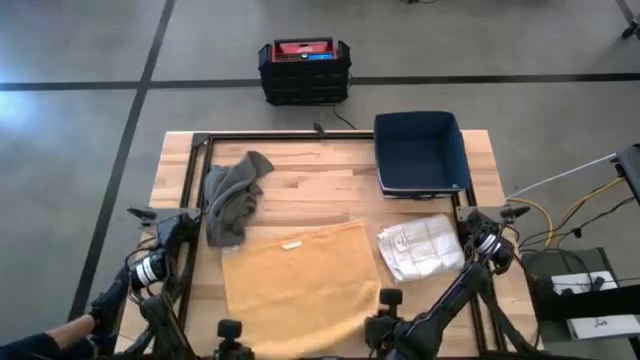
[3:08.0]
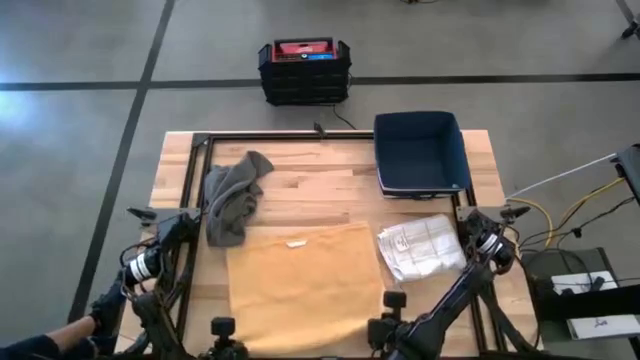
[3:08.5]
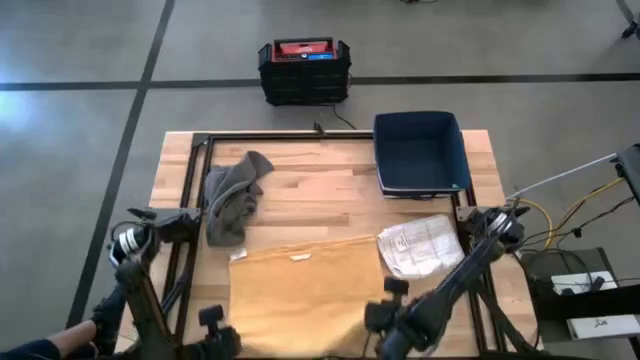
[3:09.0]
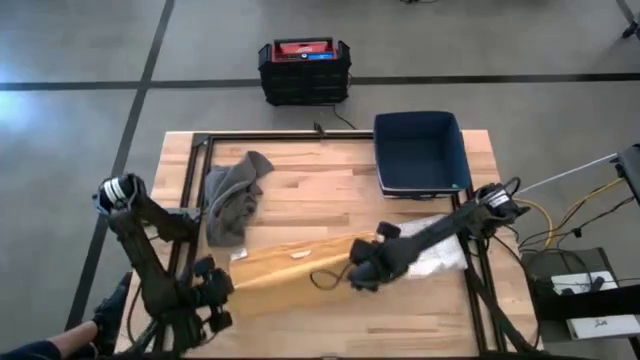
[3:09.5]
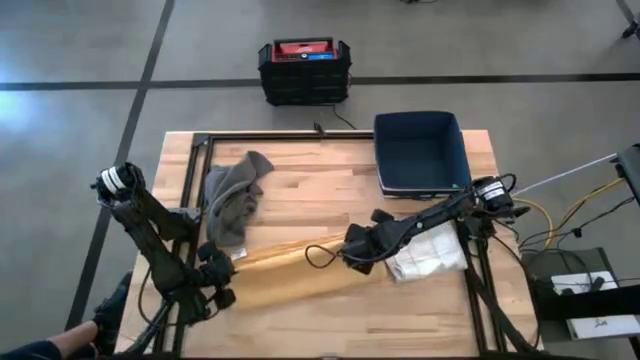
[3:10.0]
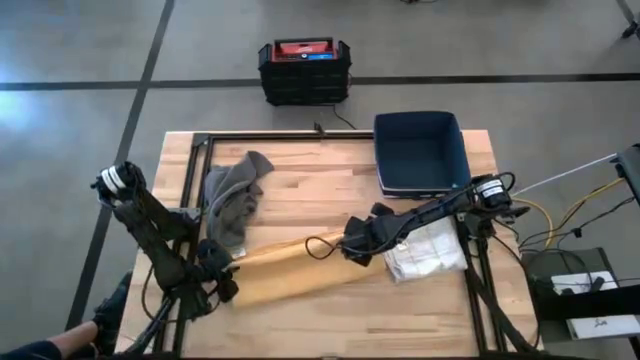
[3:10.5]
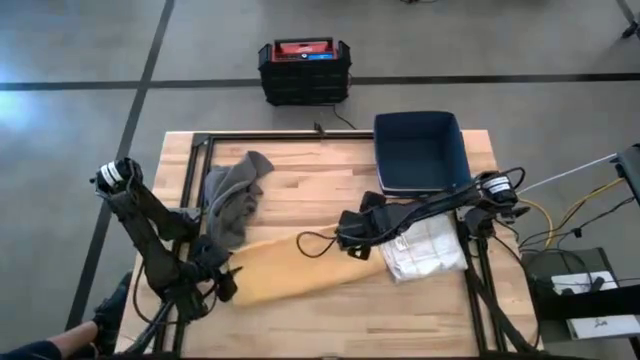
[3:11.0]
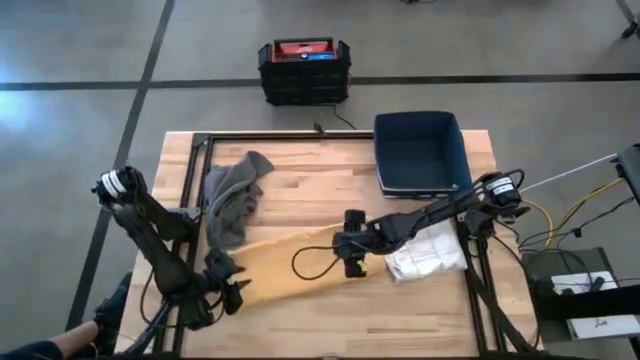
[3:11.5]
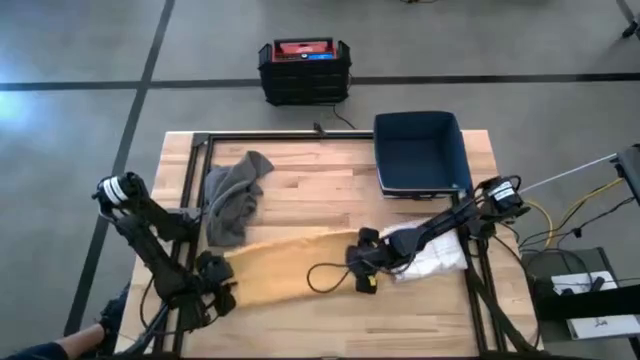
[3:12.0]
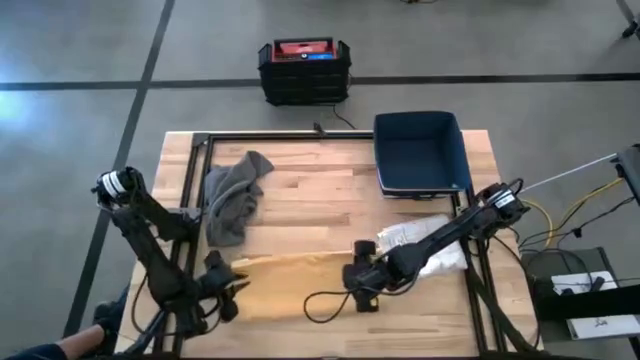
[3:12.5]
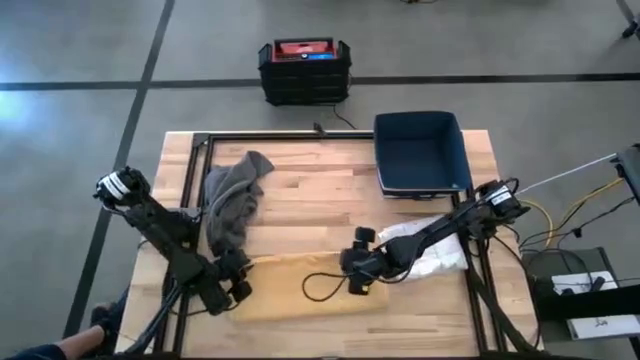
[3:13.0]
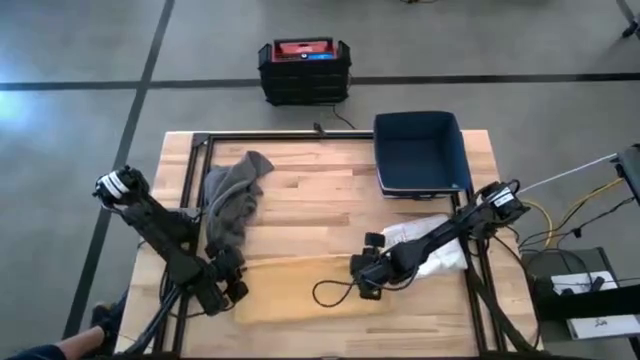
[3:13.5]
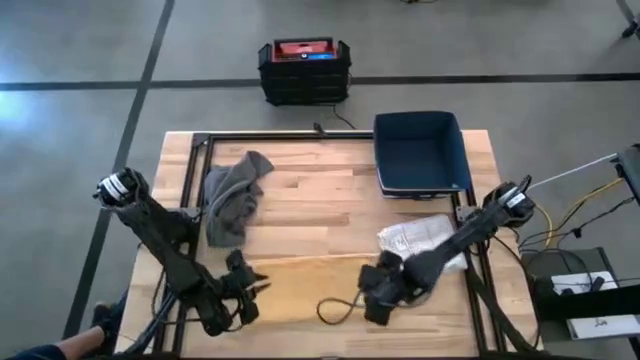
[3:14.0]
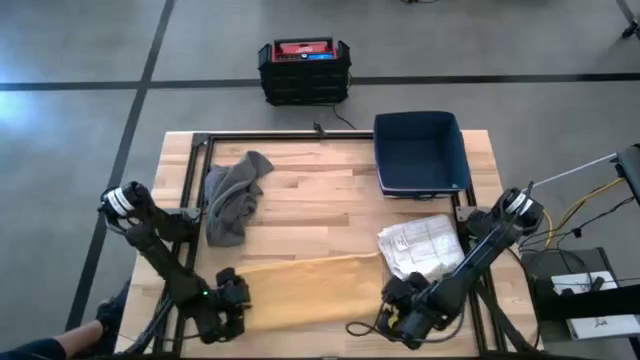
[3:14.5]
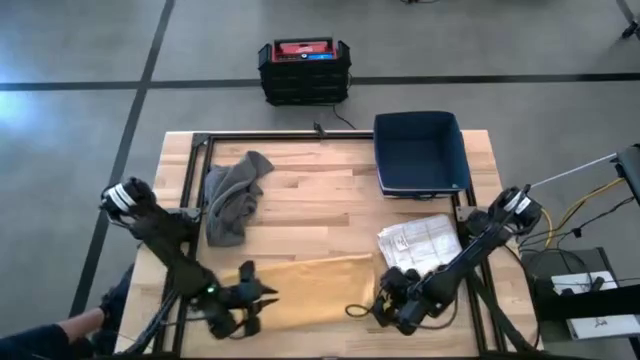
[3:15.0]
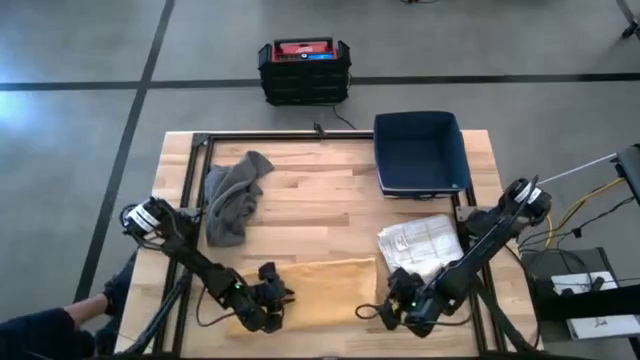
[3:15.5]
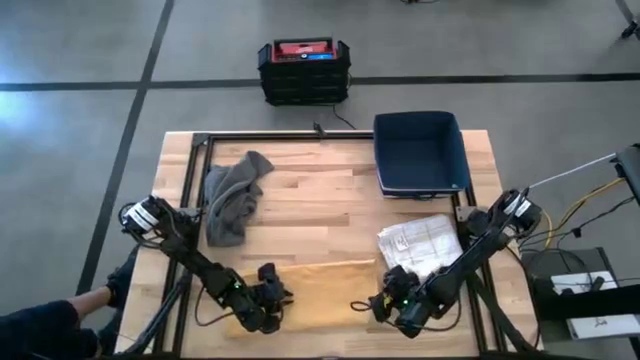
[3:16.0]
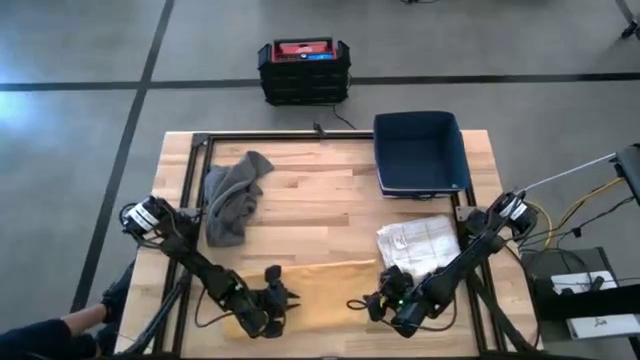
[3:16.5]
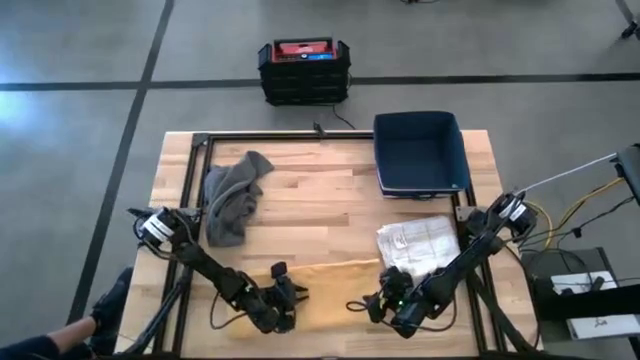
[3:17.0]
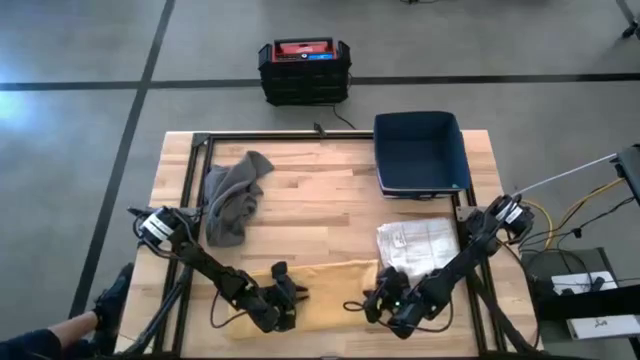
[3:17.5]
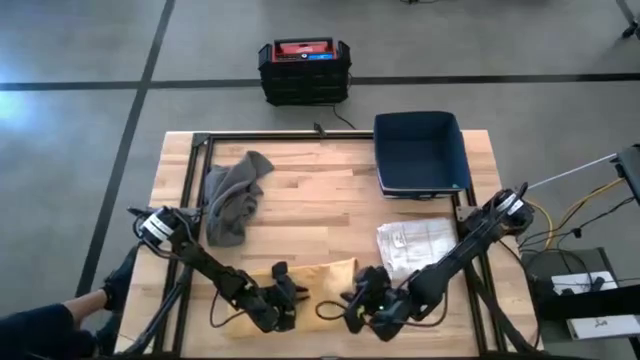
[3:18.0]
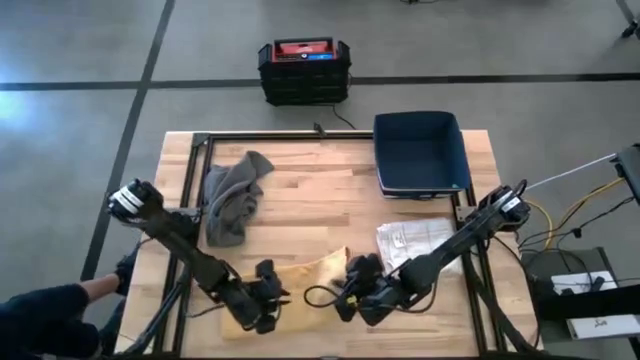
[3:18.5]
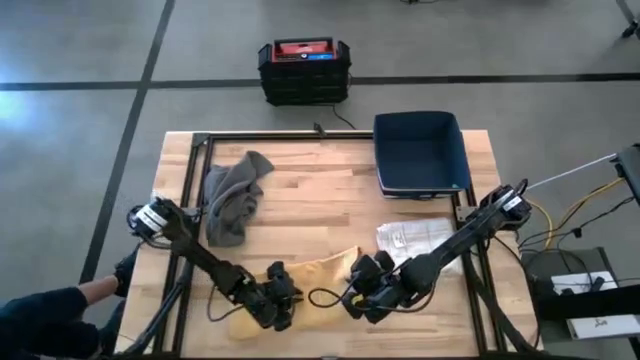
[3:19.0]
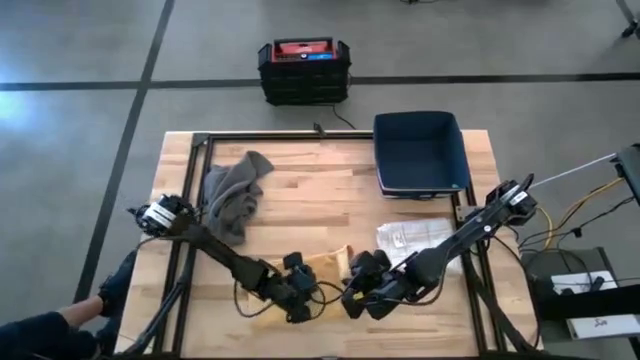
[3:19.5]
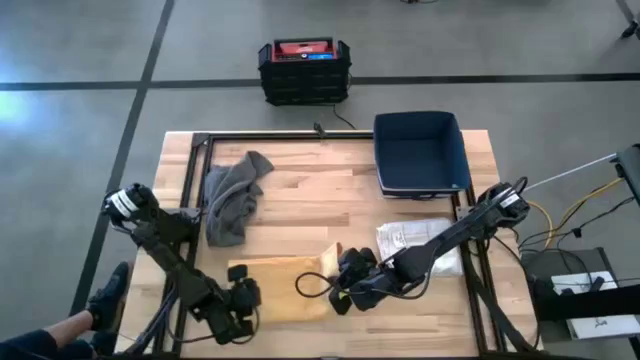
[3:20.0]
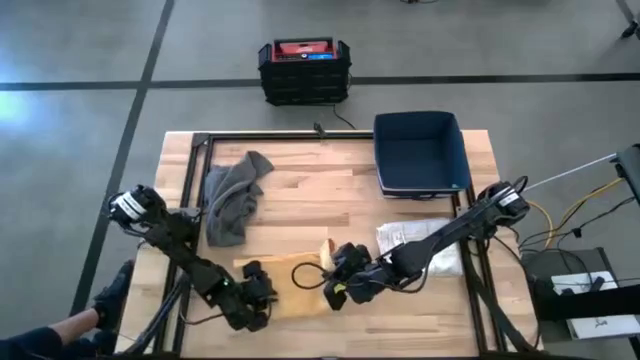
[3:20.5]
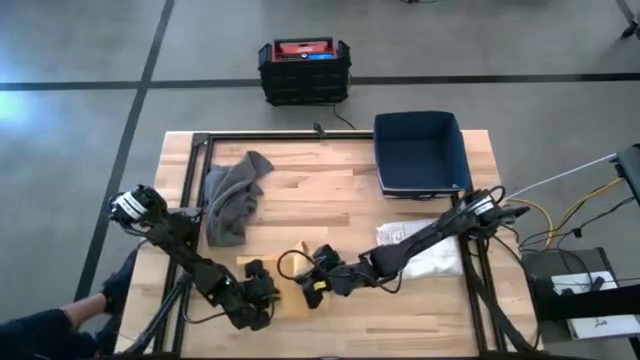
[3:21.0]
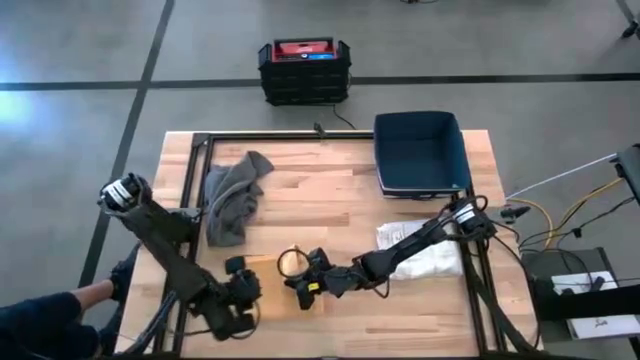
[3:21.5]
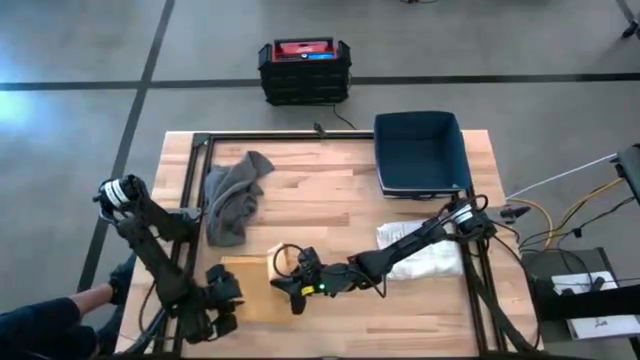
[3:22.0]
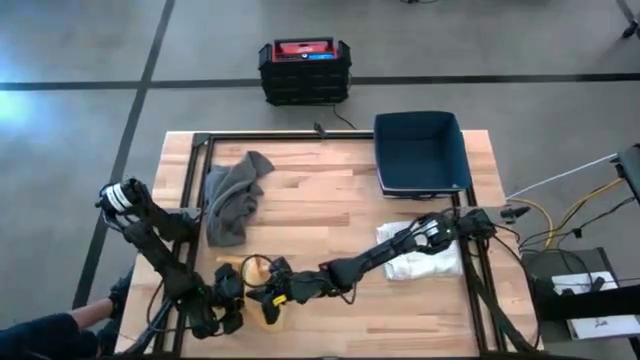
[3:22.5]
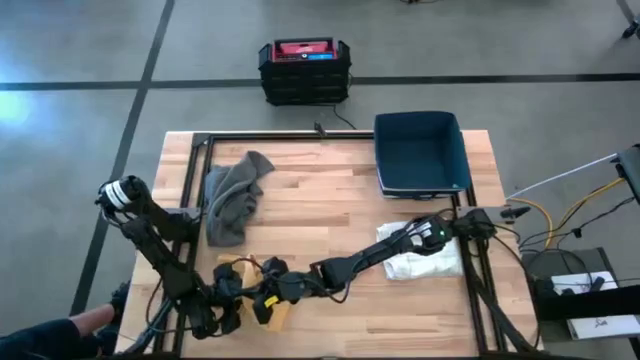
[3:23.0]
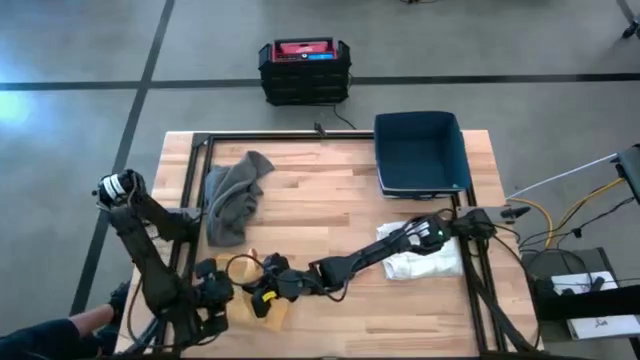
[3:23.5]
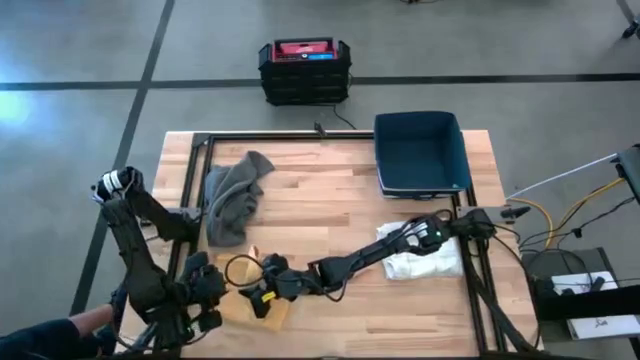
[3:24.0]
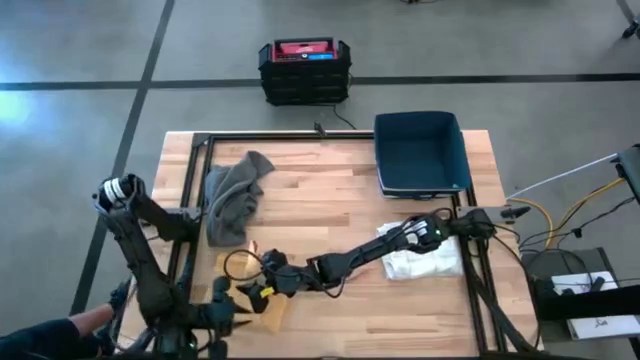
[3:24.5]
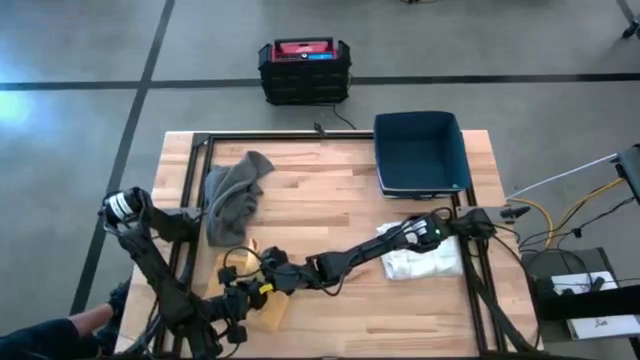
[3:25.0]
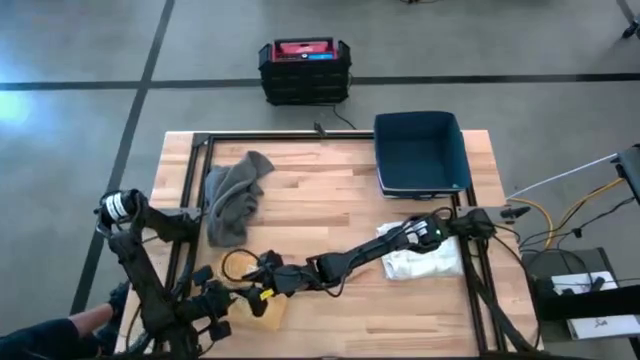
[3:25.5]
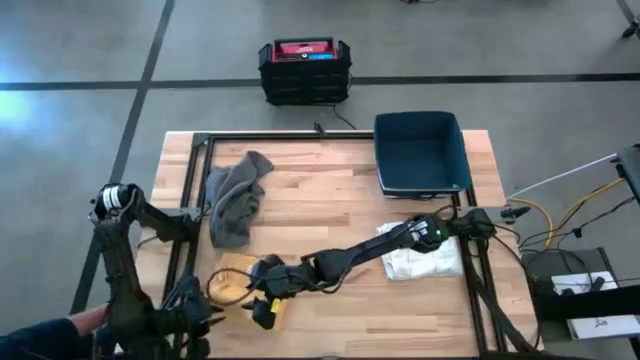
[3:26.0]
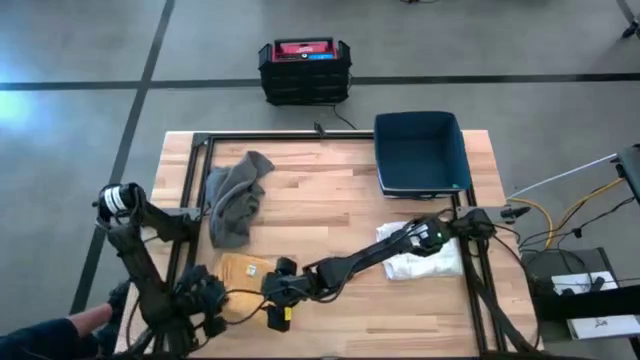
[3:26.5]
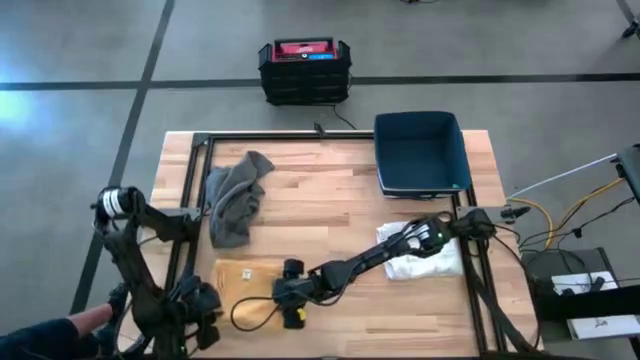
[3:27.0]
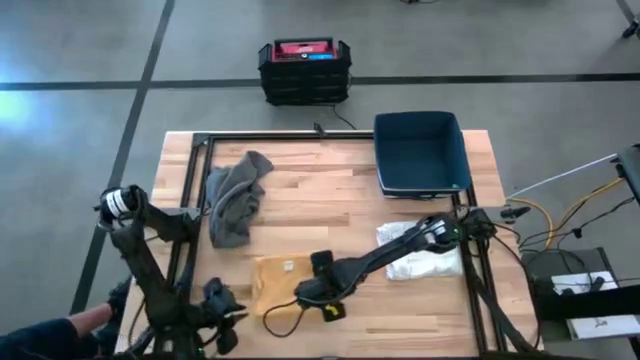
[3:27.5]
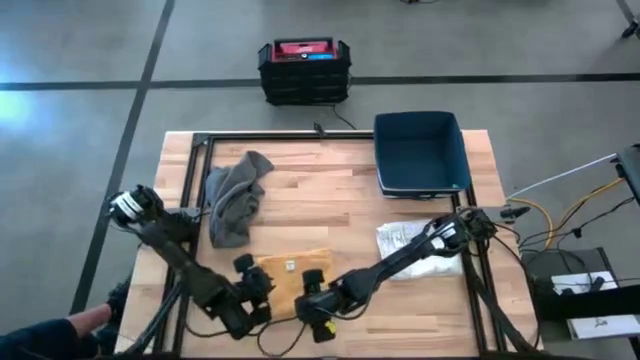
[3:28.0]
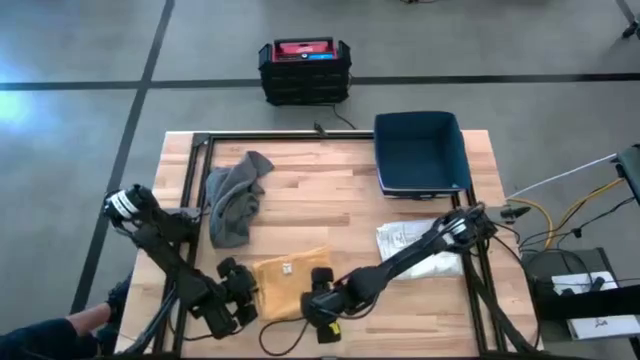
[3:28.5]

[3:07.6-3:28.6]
Task: Fold towel
Fold the yellow towel
